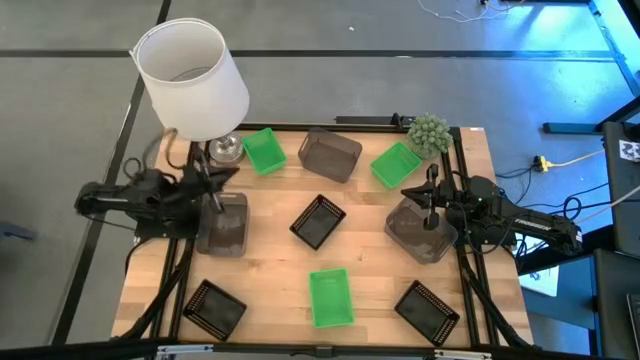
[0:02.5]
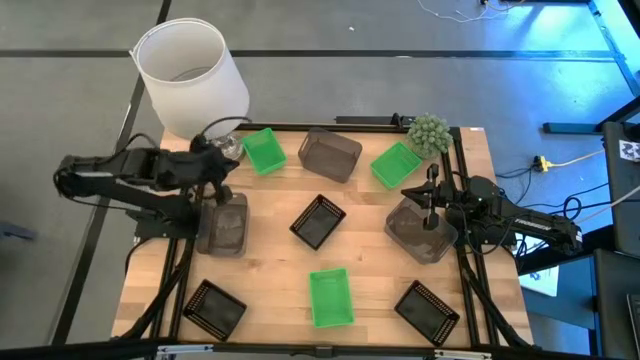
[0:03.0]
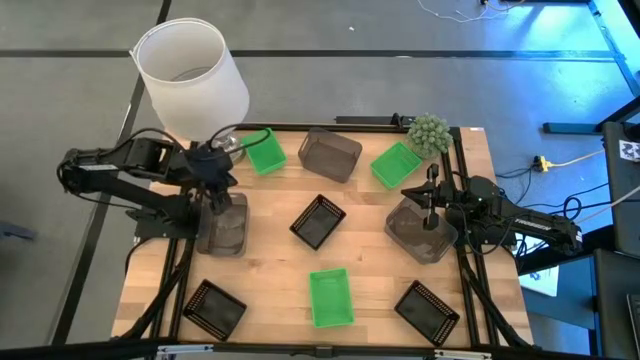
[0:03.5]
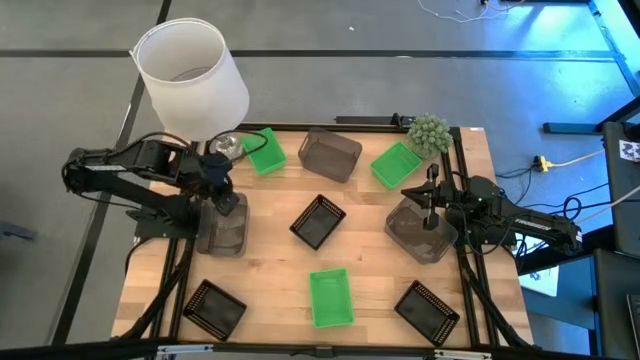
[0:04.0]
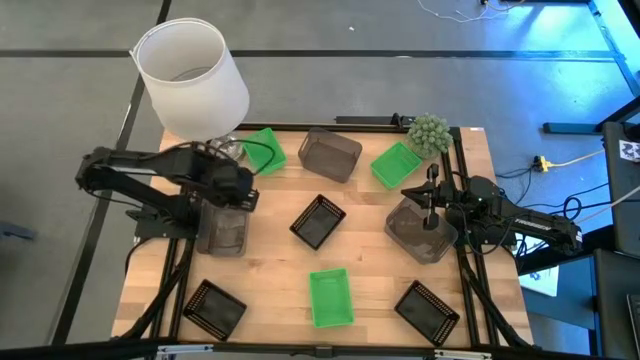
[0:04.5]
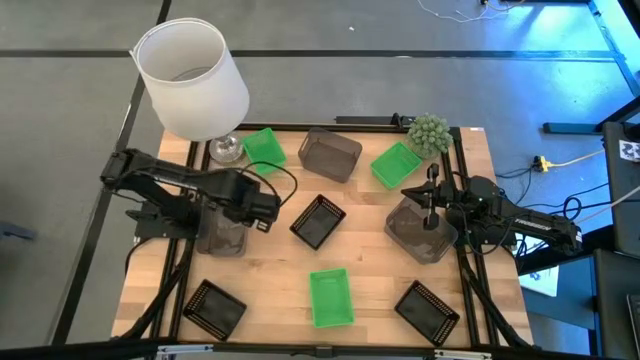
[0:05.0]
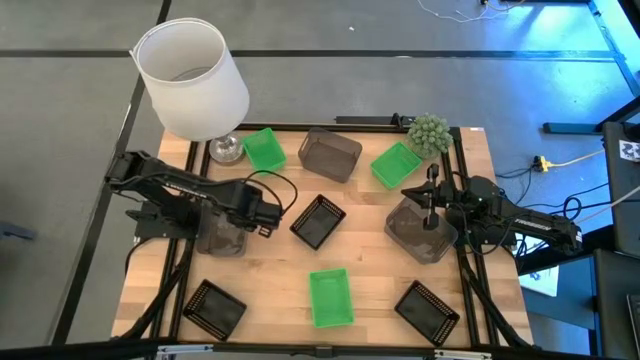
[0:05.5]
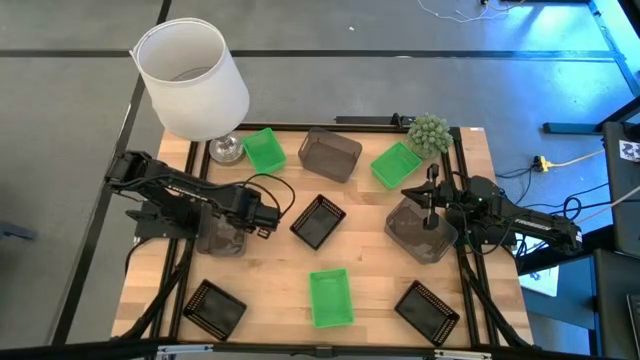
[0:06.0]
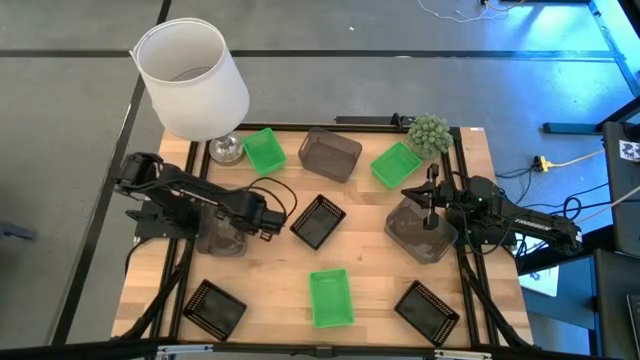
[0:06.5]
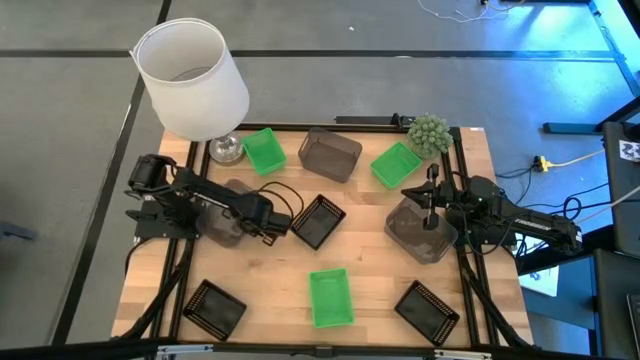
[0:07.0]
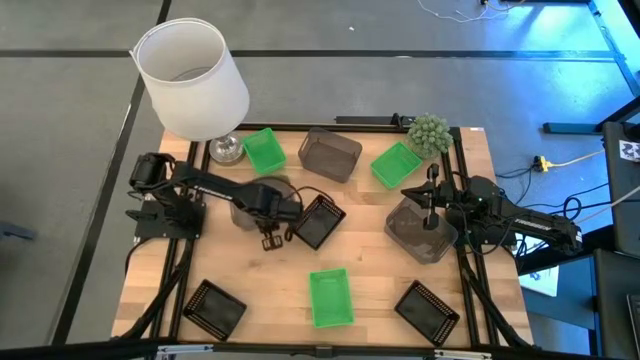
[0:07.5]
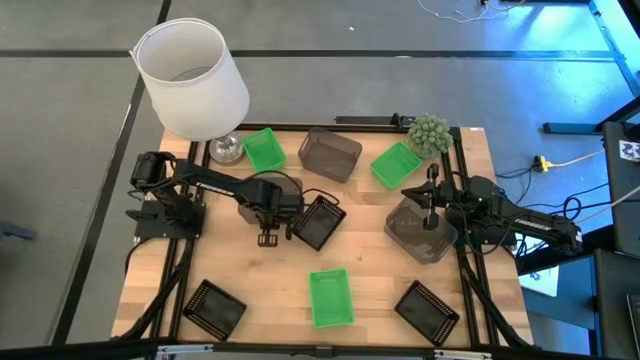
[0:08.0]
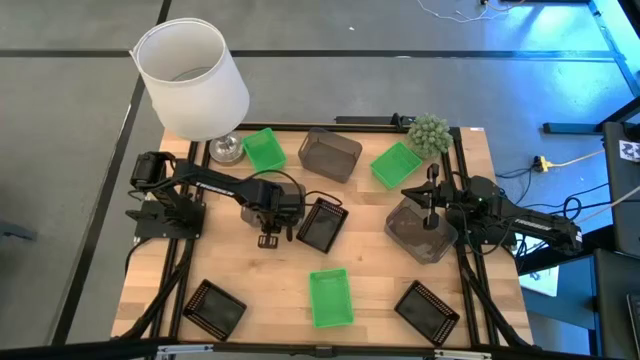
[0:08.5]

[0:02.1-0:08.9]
Adjust the left black transparent bin

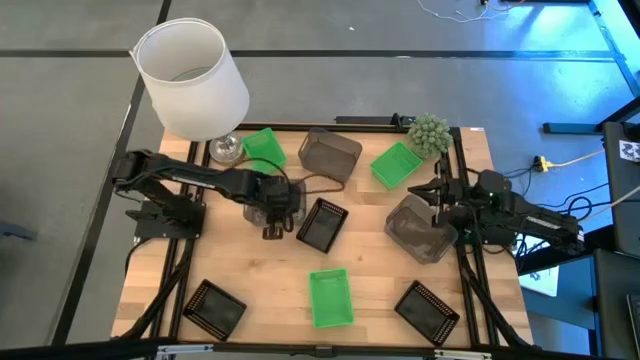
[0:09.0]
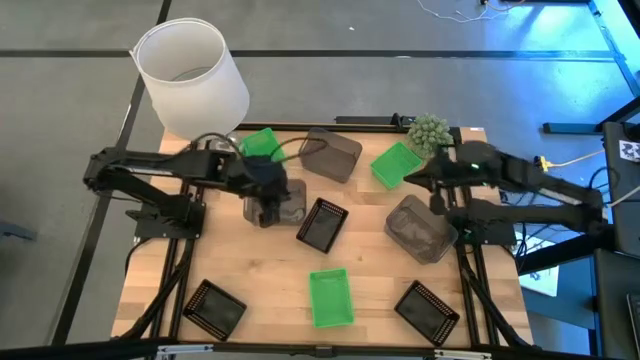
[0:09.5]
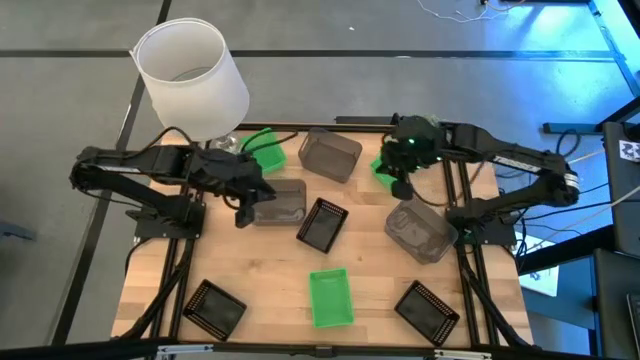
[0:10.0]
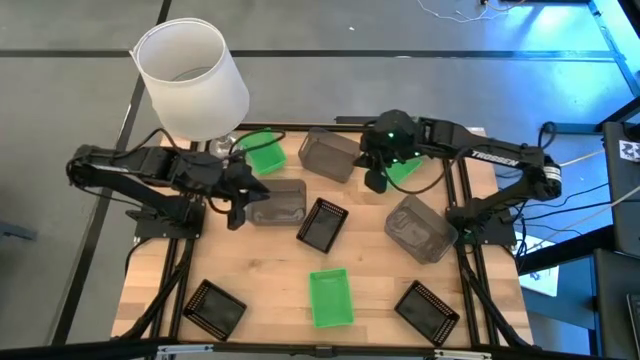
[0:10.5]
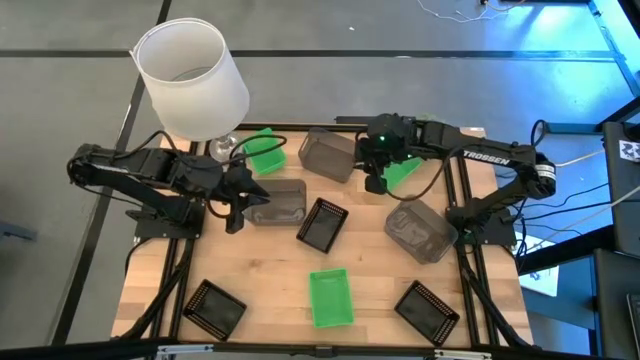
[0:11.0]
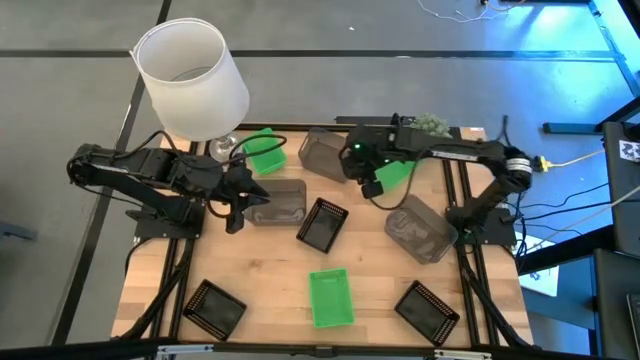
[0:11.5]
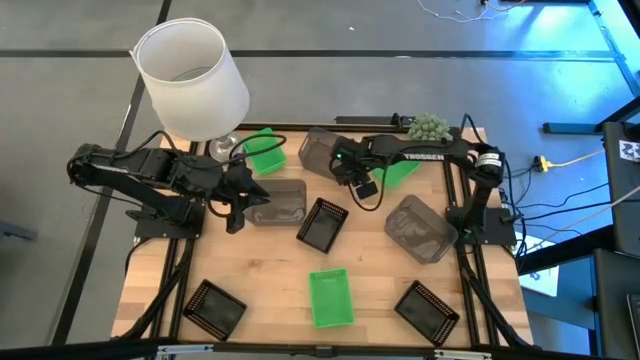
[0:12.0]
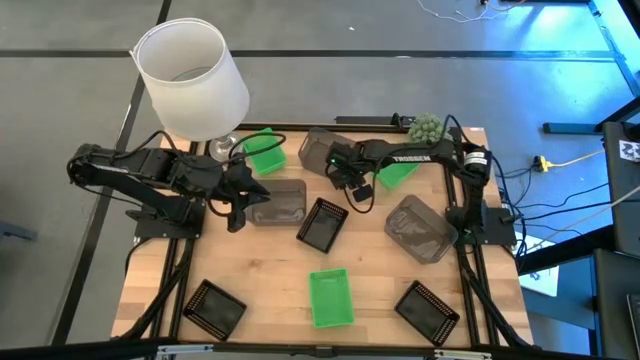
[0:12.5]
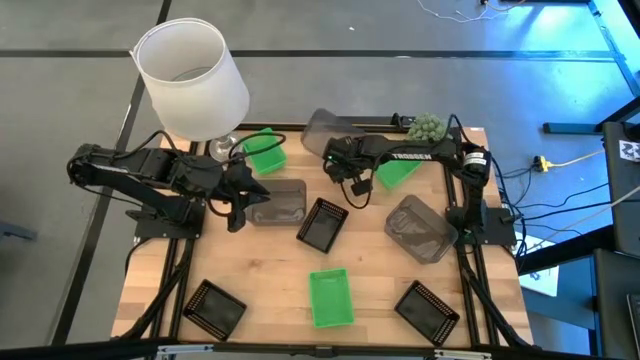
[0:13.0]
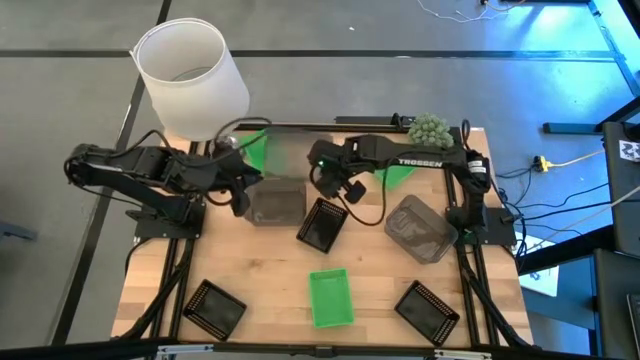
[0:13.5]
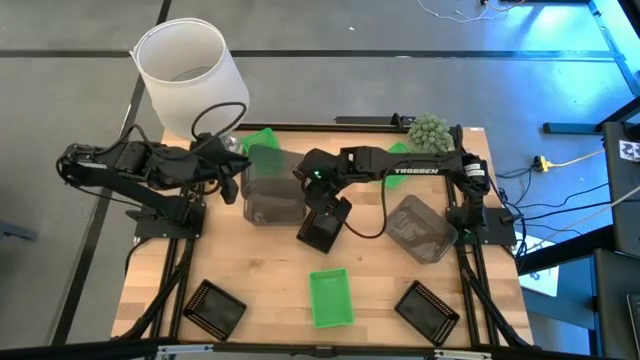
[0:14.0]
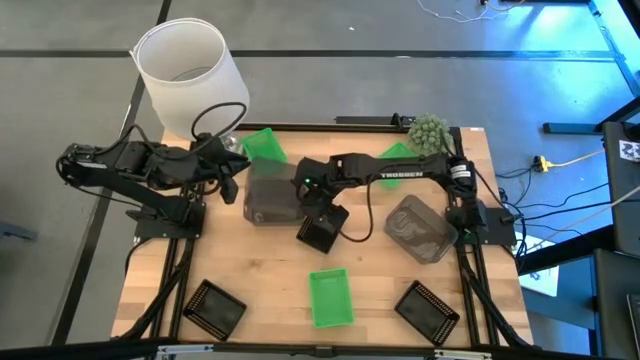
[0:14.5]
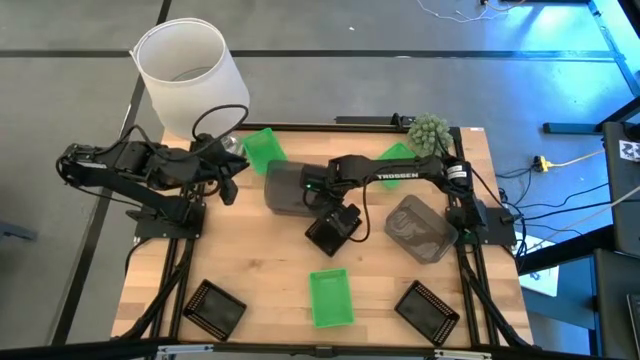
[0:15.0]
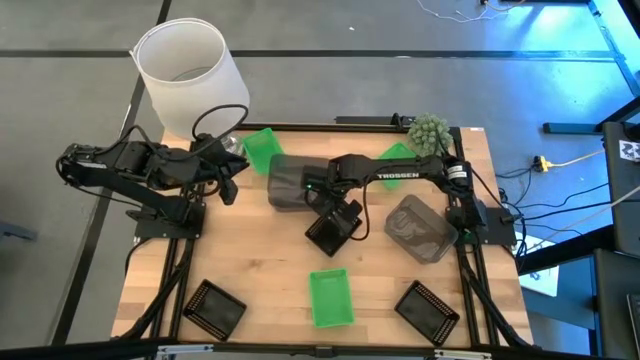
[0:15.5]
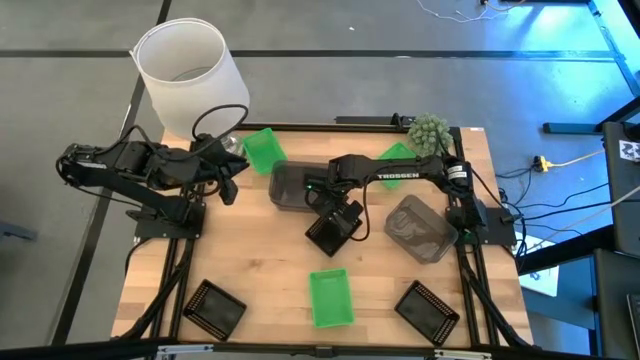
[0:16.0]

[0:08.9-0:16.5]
Stack the middle black transparent bin on top of the left black transparent bin

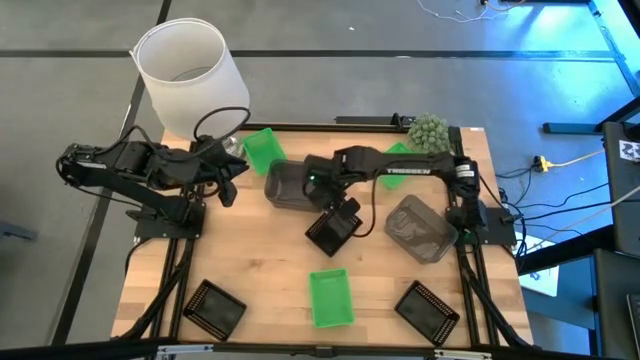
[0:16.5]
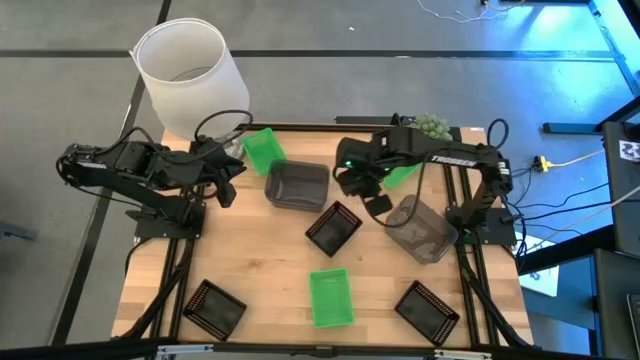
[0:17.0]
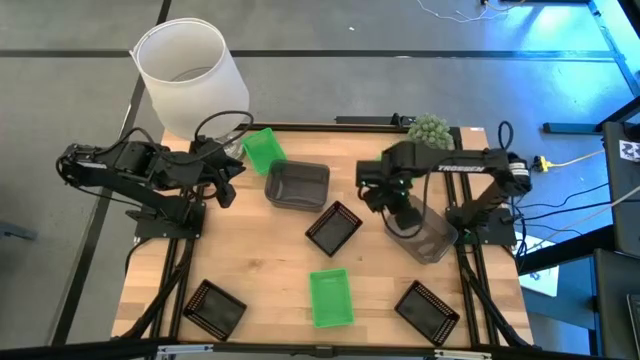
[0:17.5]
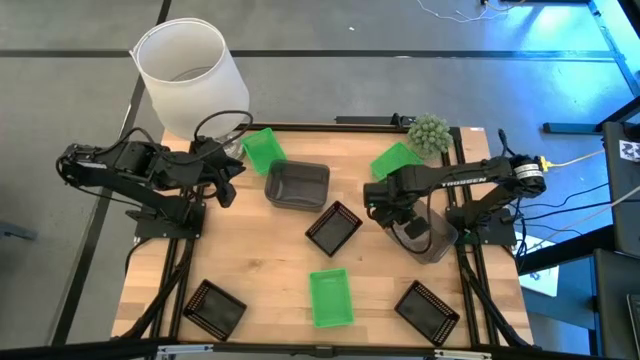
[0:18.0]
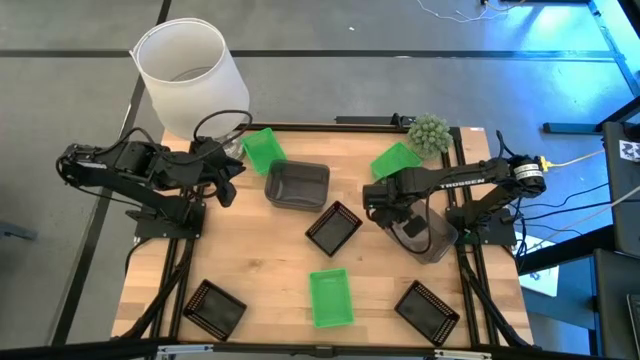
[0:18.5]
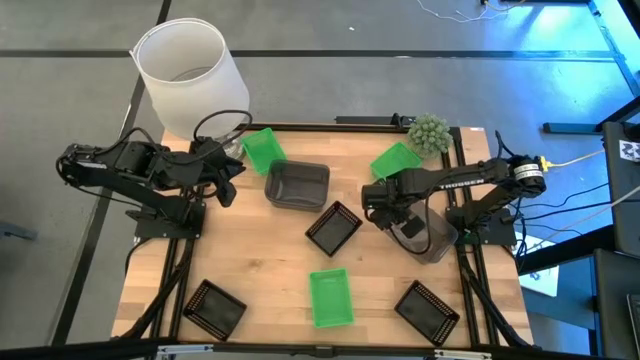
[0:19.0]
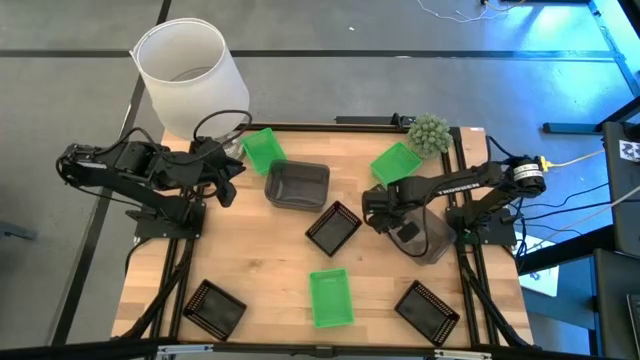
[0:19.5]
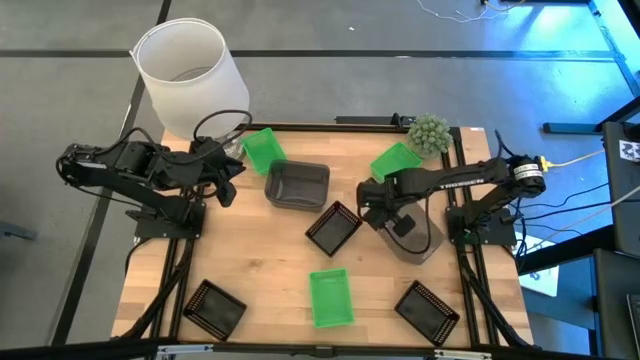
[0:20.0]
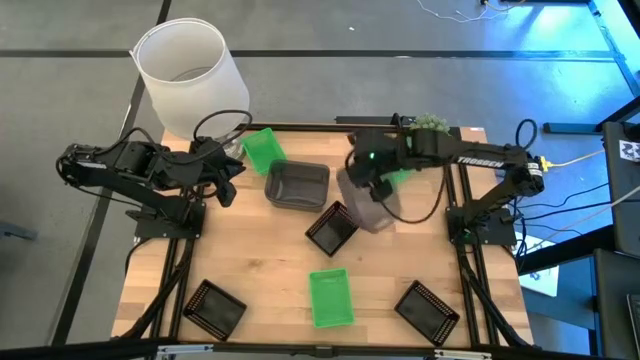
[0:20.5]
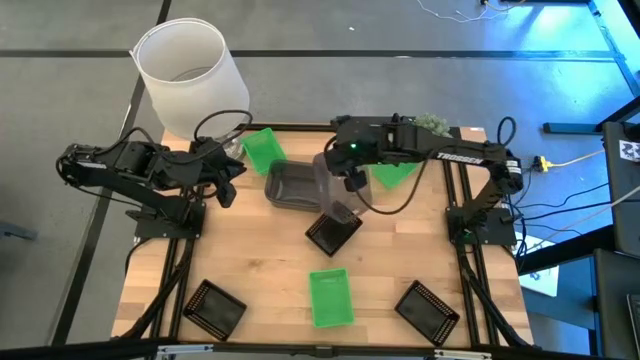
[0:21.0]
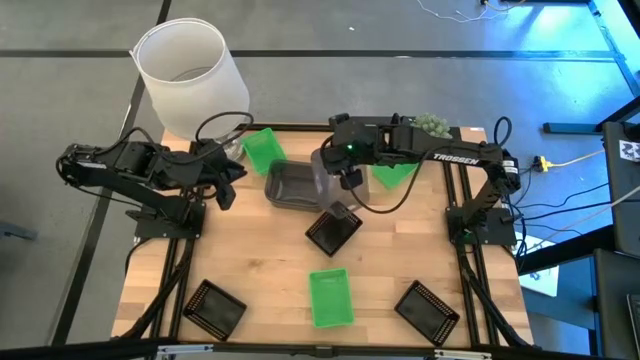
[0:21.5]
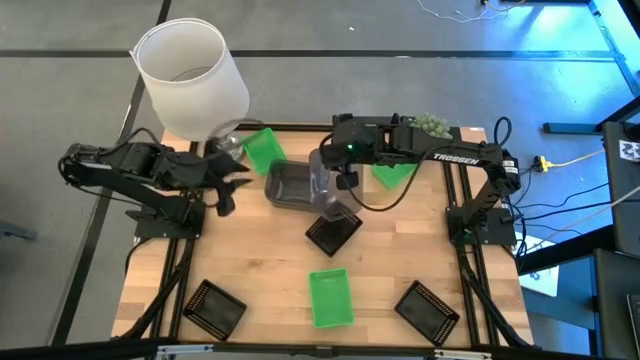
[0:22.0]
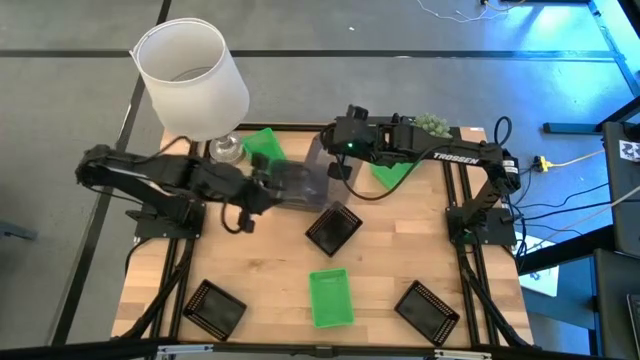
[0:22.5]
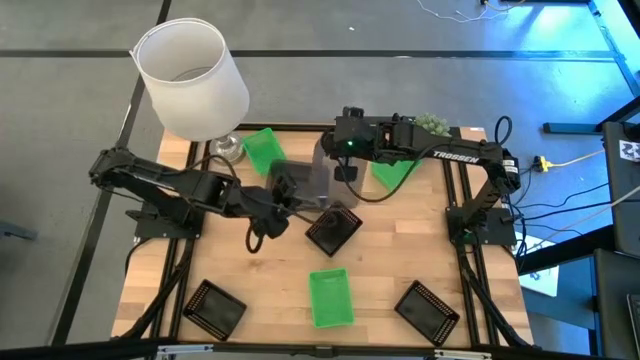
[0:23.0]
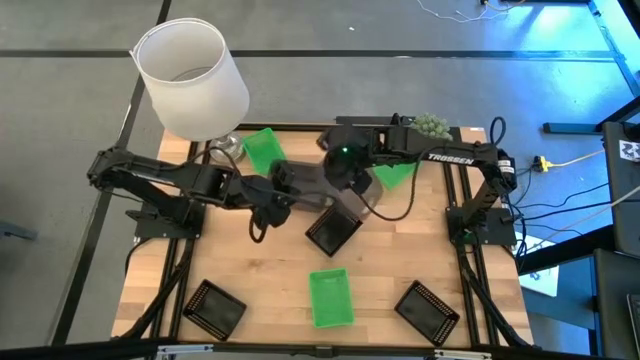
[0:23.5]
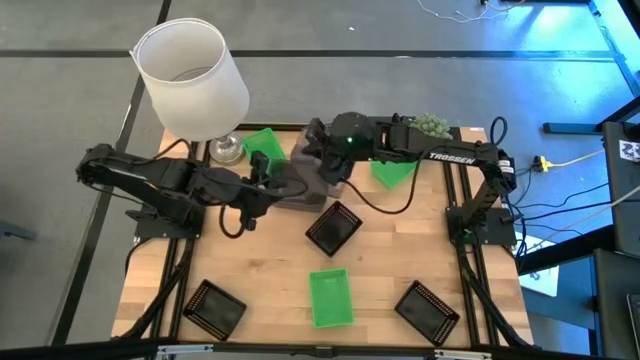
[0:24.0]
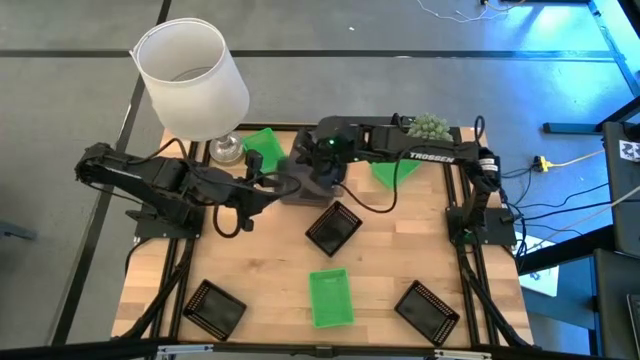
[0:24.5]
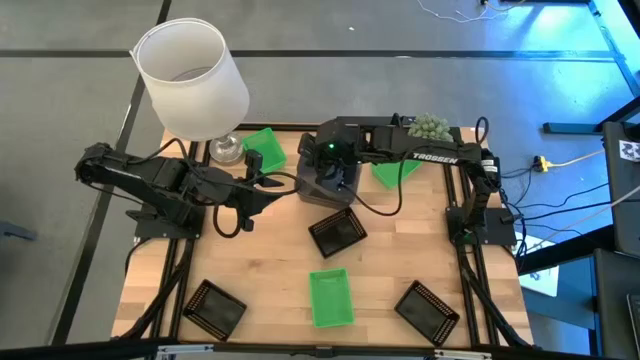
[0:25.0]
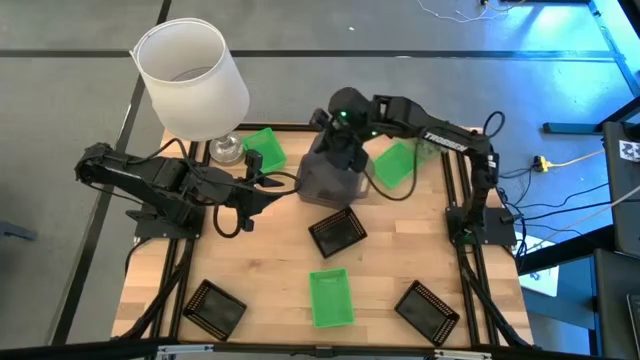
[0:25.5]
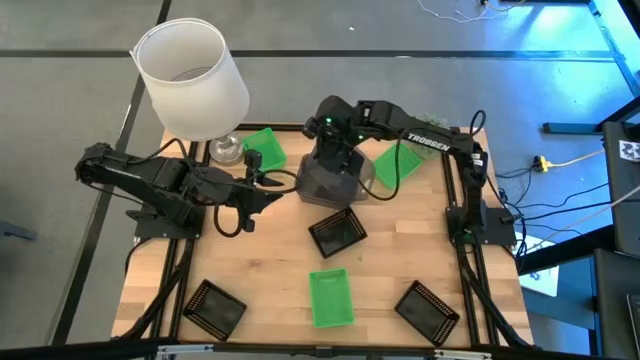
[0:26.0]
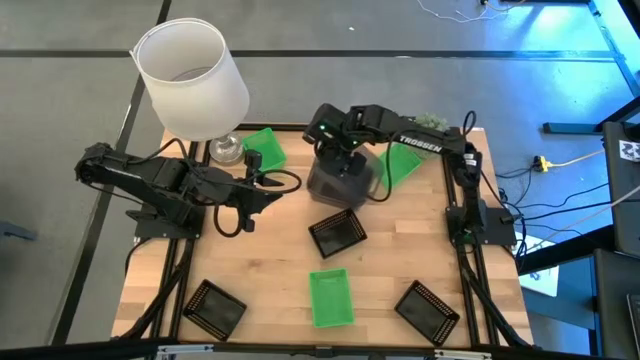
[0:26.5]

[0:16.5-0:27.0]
Stack the right black transparent bin on top of the left black transparent bin
